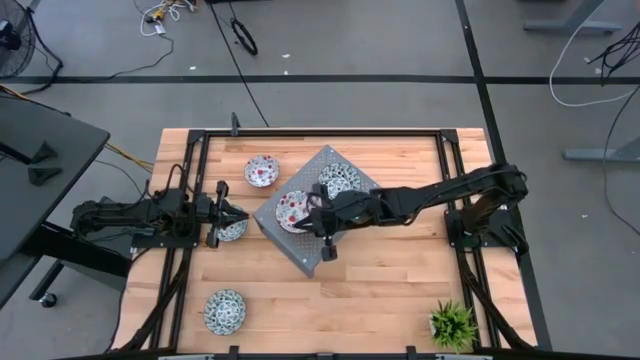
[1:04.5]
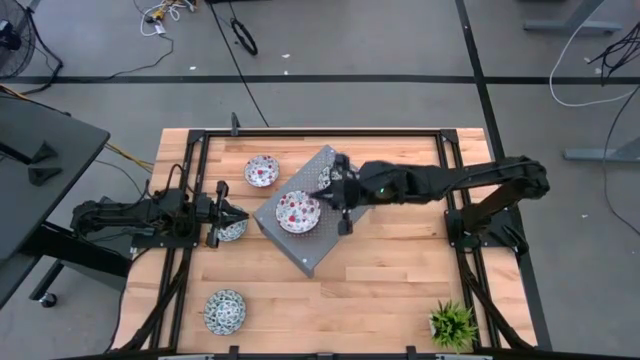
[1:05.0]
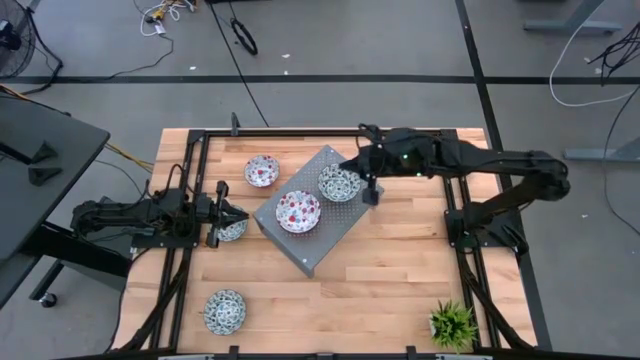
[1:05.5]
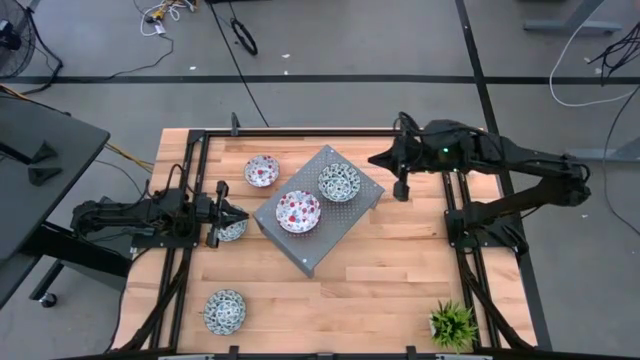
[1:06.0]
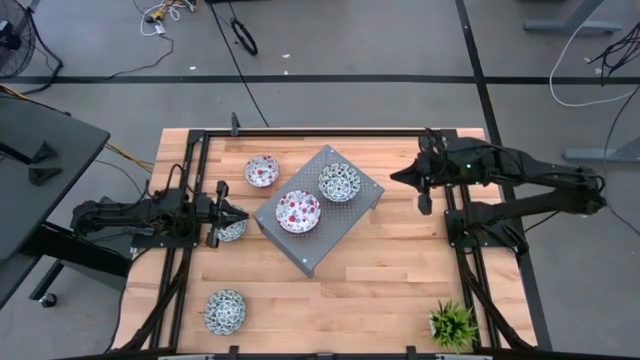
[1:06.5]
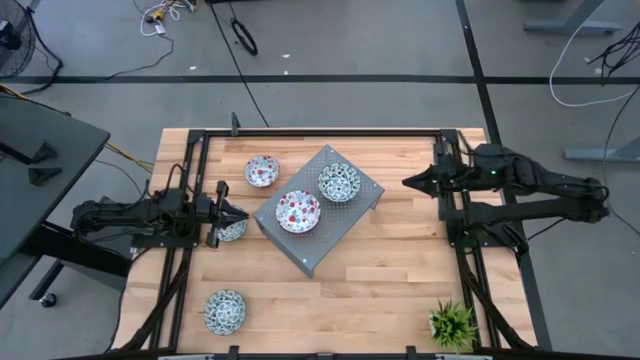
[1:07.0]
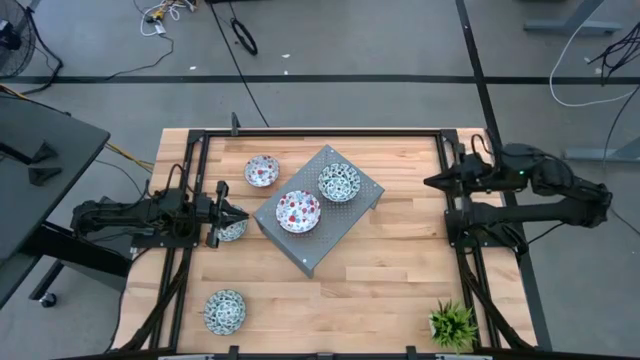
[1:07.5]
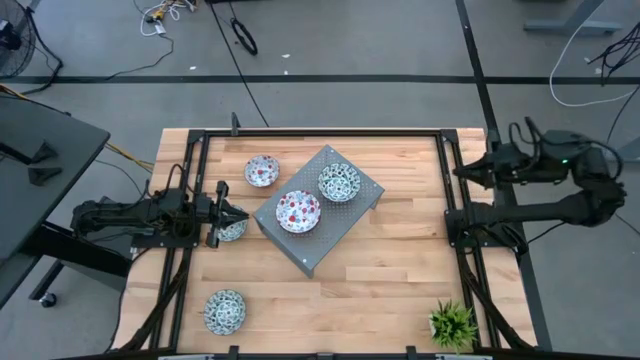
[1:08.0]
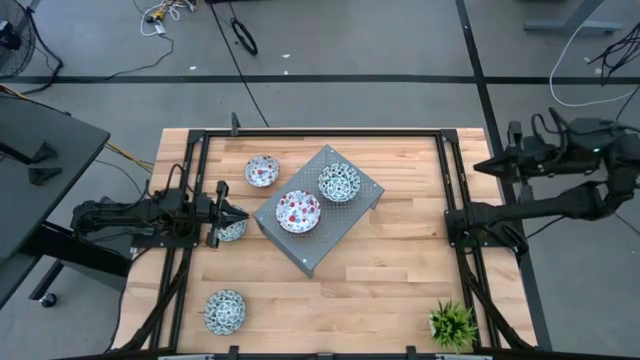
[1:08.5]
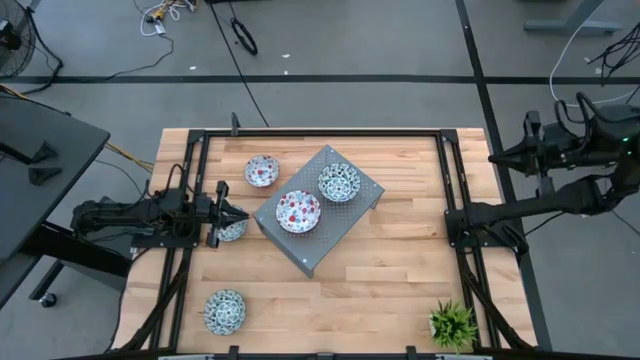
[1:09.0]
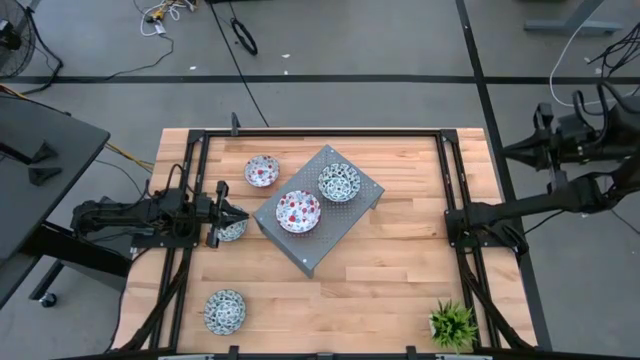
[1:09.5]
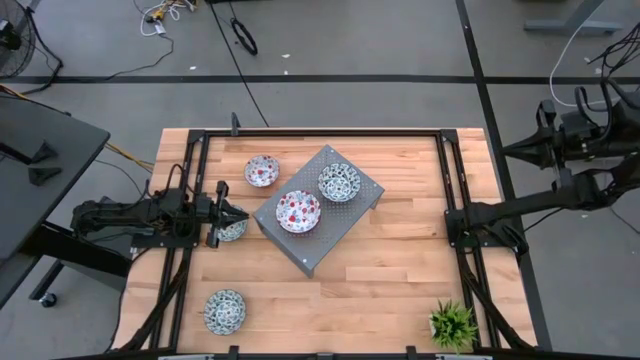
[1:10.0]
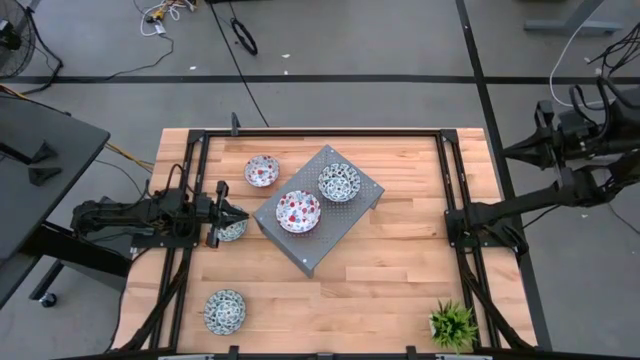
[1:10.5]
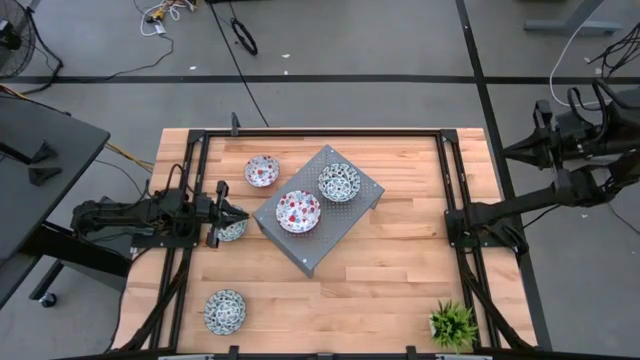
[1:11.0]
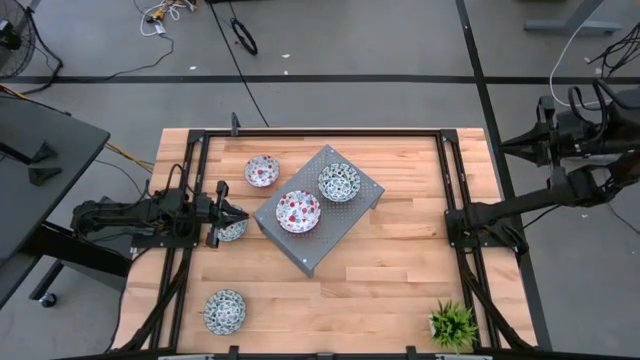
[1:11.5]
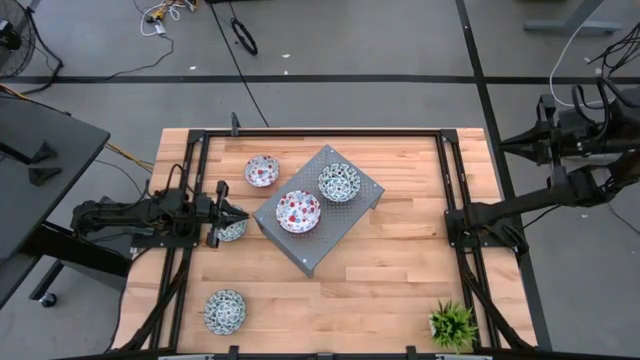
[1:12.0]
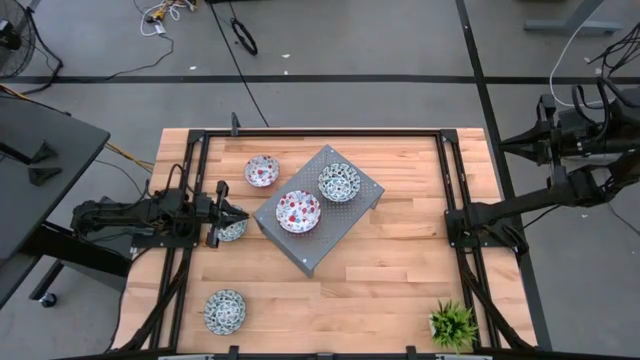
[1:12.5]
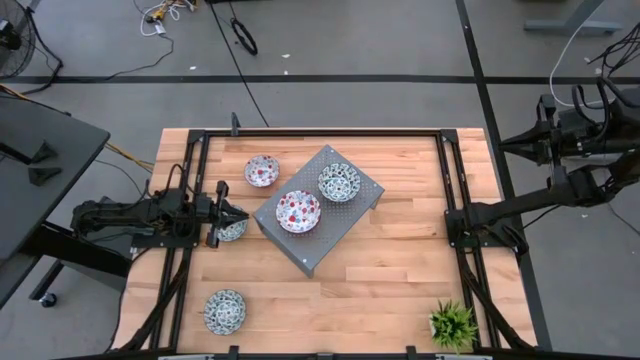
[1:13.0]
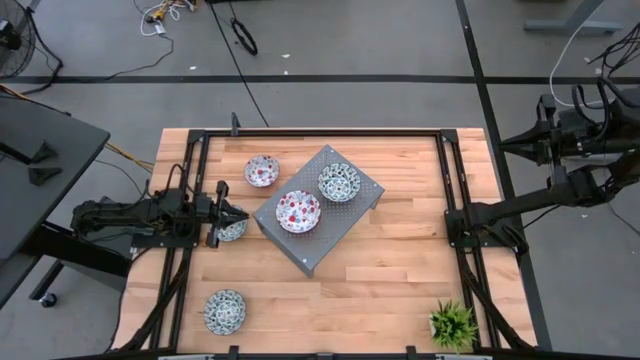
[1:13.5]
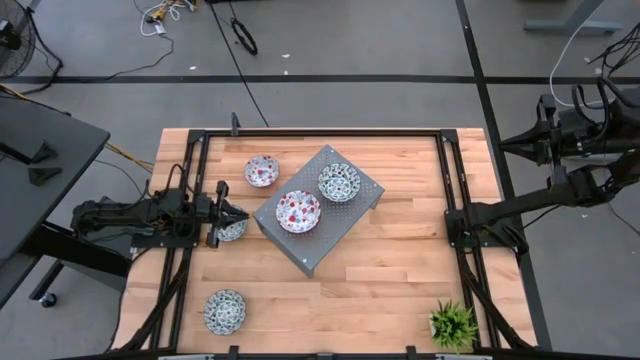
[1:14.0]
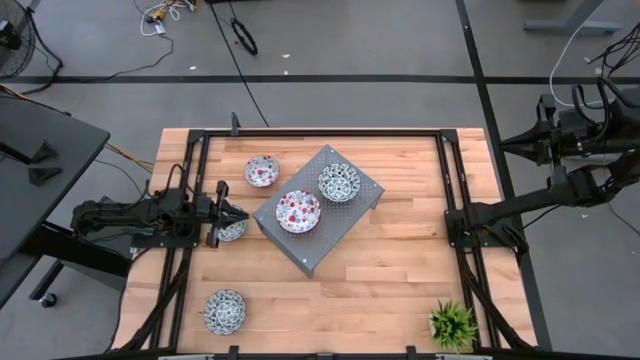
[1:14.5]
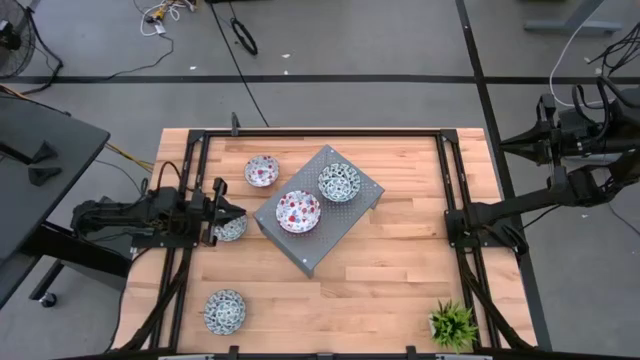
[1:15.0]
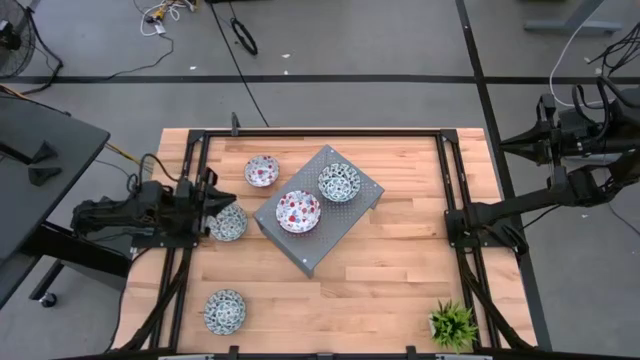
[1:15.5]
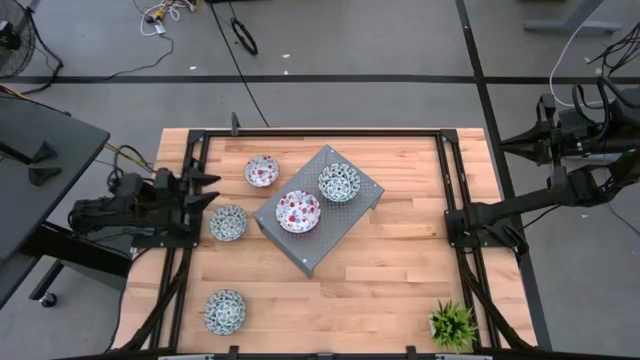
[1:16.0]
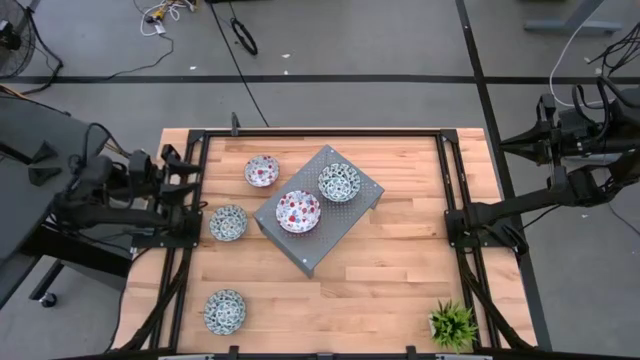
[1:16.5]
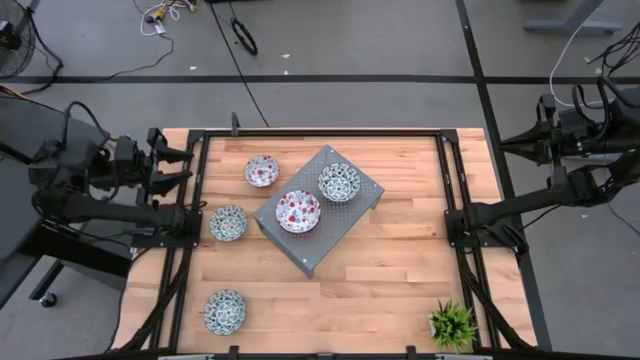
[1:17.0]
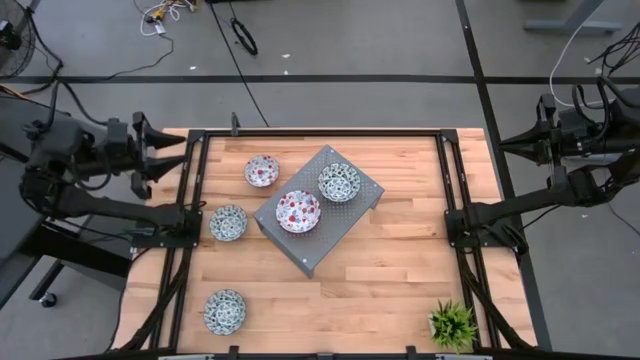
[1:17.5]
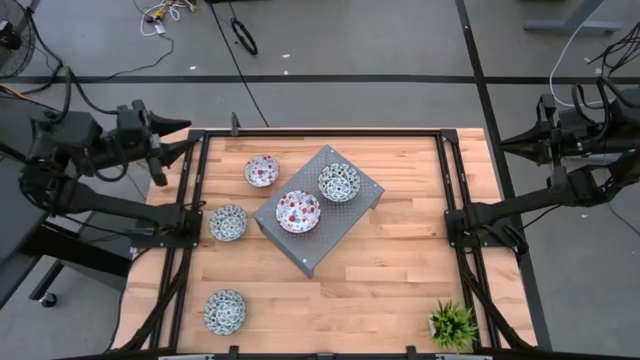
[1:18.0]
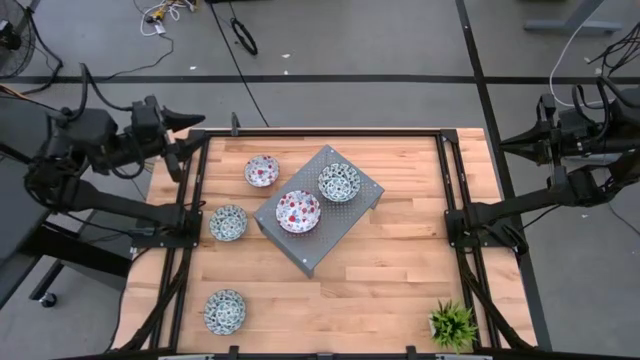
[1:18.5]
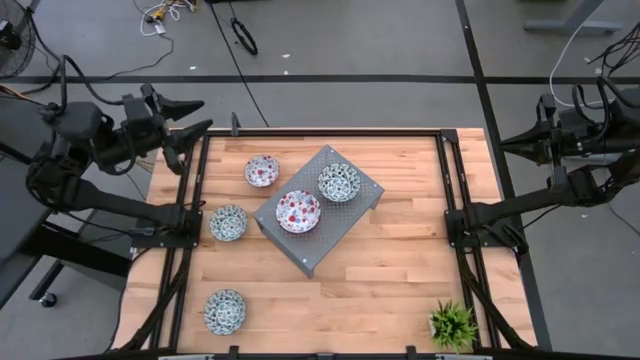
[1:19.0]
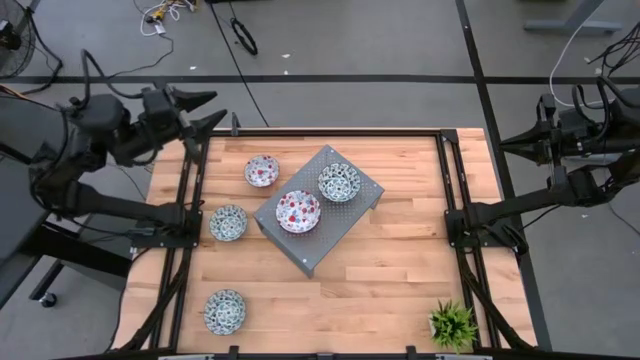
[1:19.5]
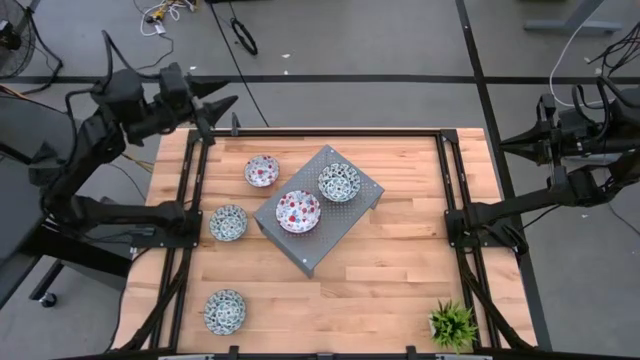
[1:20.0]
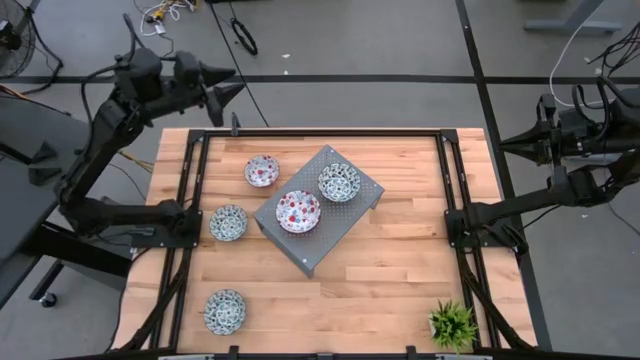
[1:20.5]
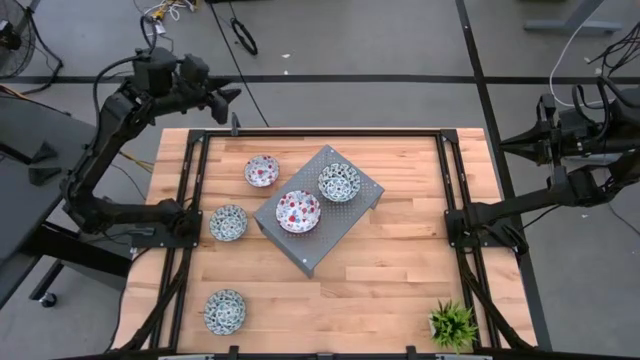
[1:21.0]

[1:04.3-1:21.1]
Task: Pick & Place Mini bowls
Stack the bottom blue patterned bowl on top of the blue patterned bowl on the shelf

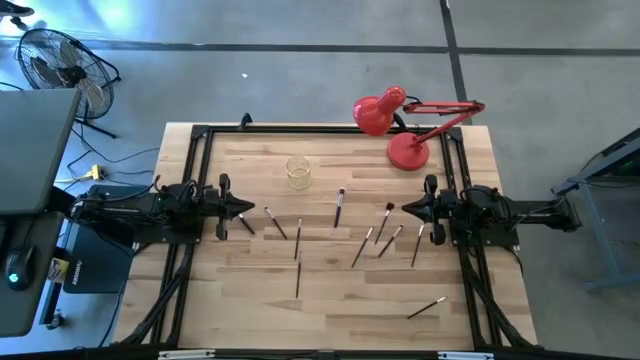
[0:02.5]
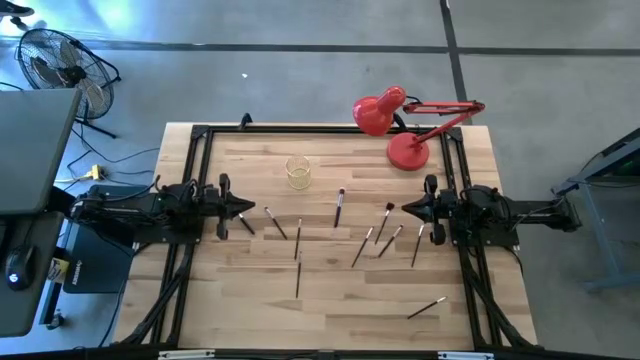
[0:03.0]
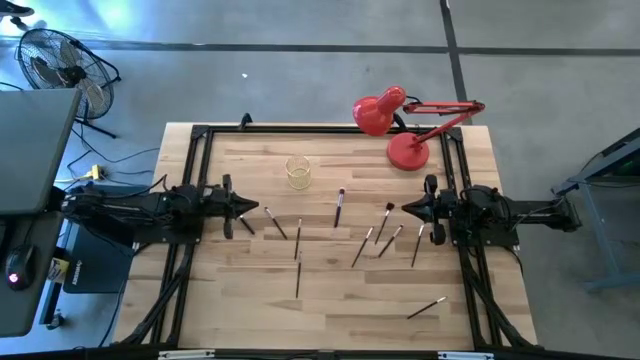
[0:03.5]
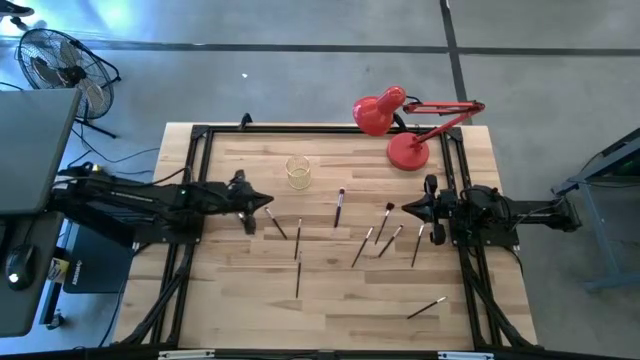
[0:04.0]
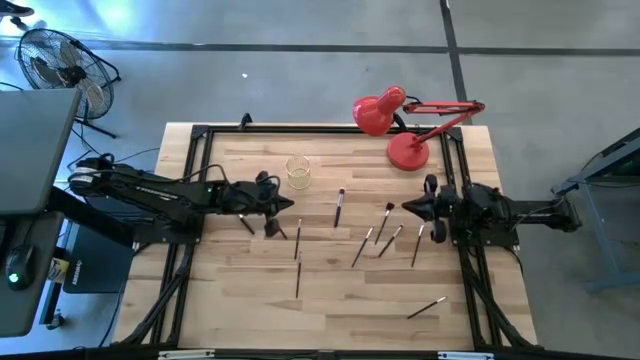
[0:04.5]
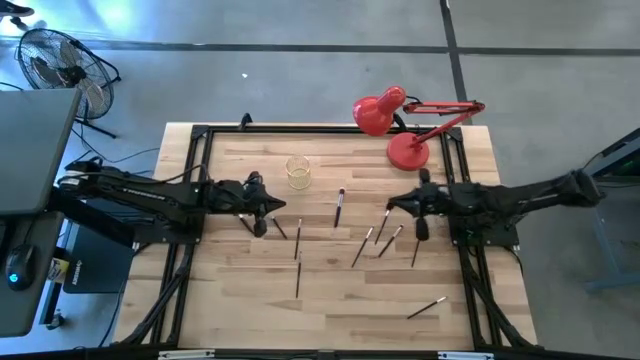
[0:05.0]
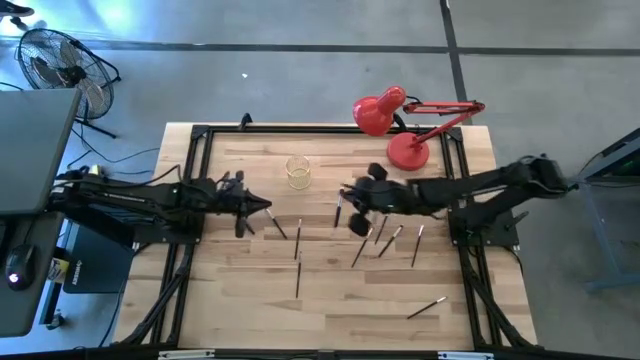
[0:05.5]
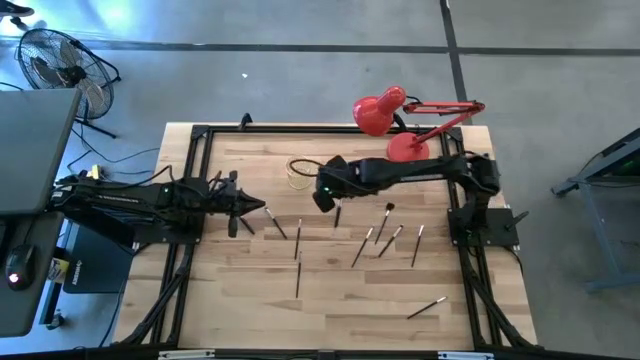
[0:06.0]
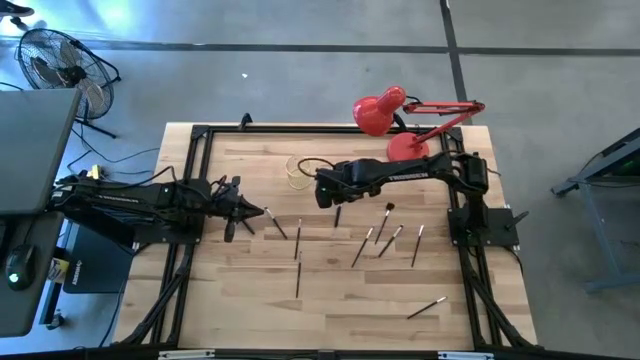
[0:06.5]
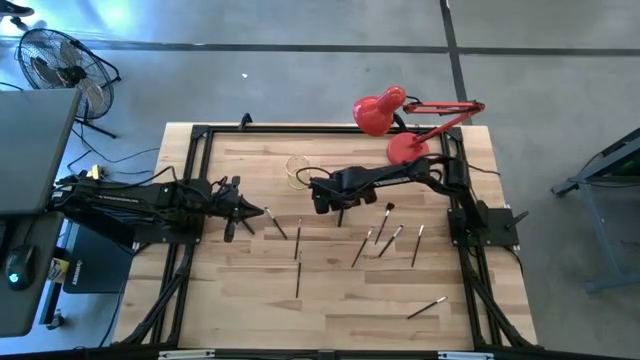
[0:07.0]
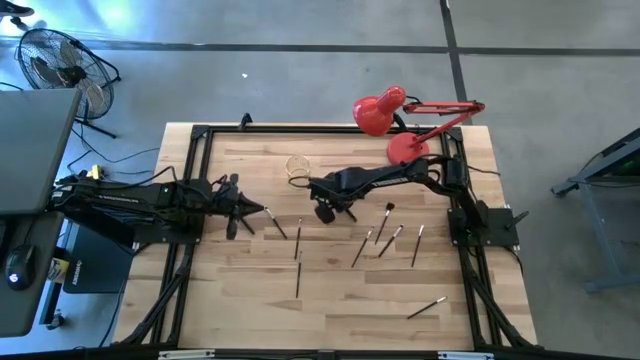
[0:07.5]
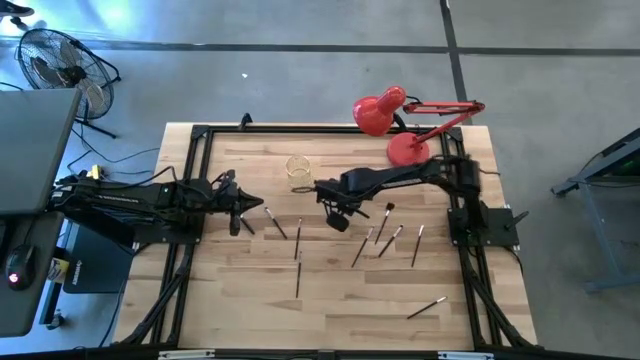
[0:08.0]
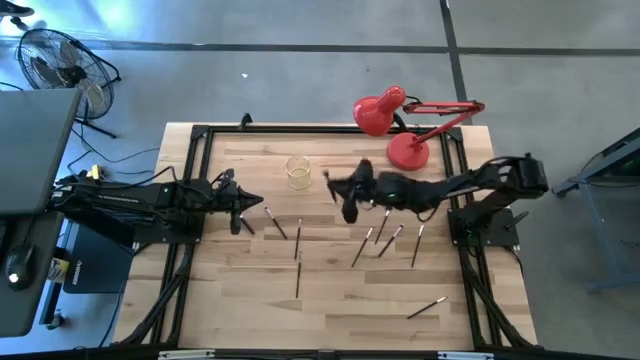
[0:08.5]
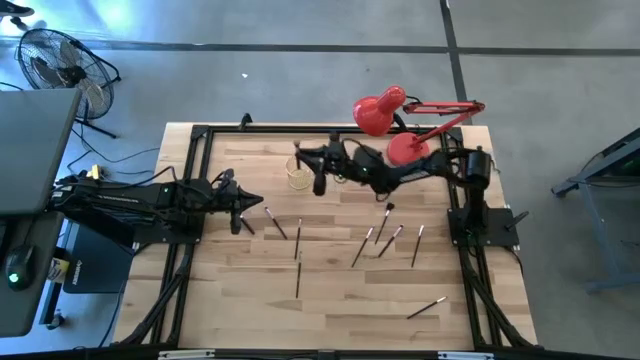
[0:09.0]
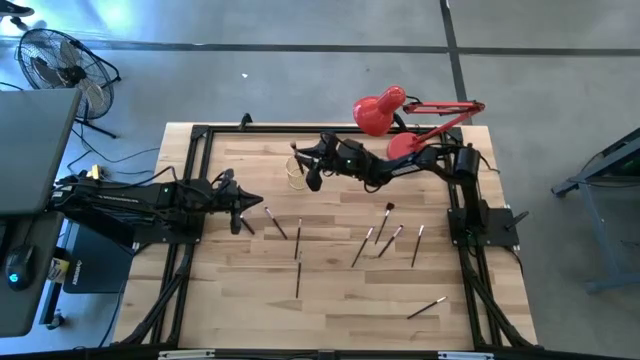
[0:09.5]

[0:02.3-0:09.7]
Task: Put items in baskets/containers
Put the blush brush into the wire organizer
